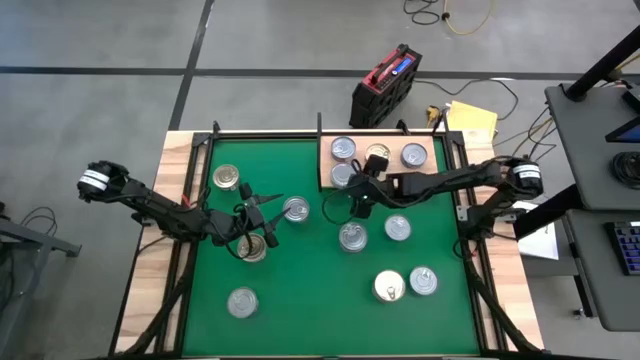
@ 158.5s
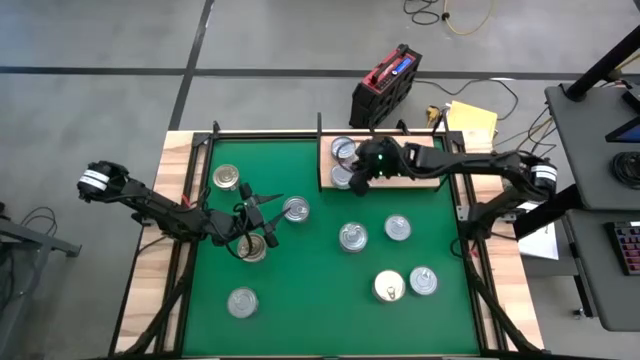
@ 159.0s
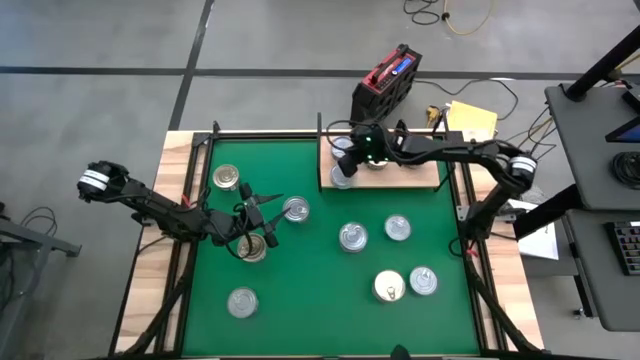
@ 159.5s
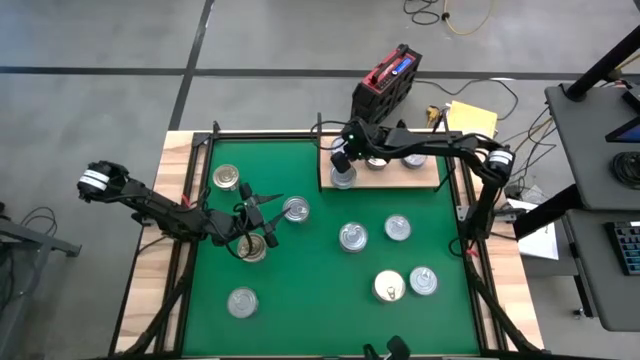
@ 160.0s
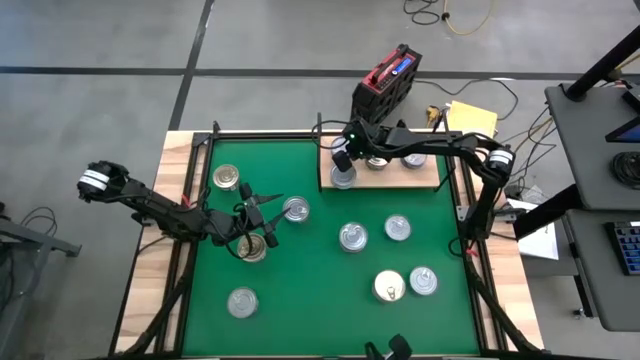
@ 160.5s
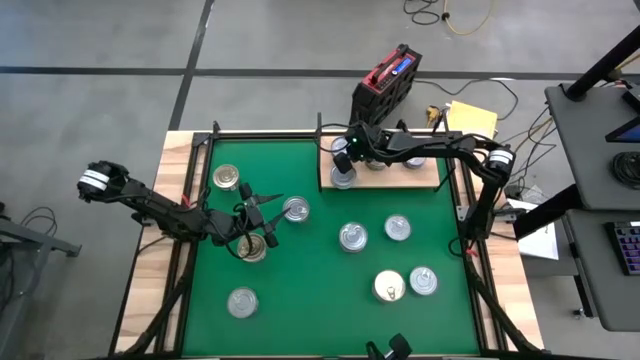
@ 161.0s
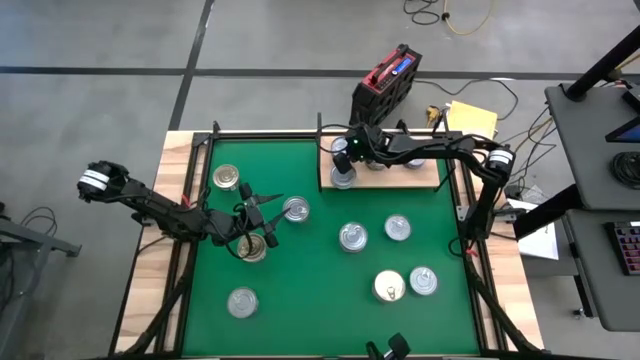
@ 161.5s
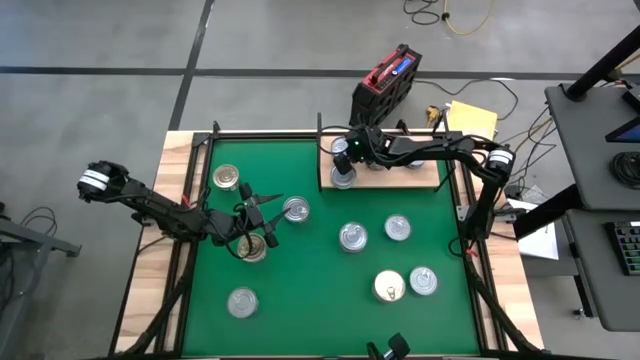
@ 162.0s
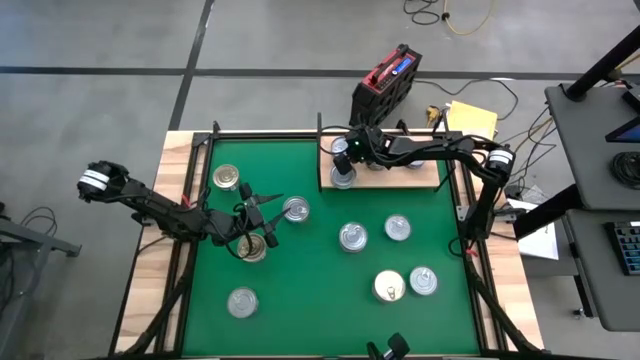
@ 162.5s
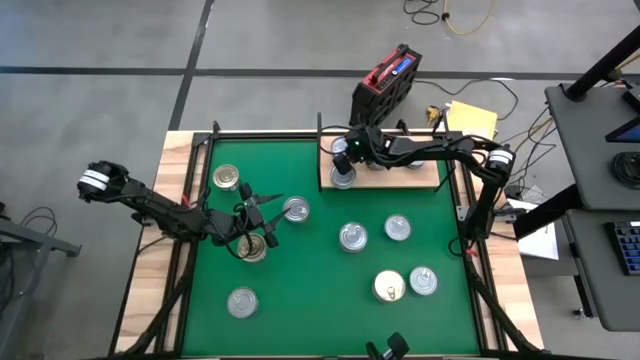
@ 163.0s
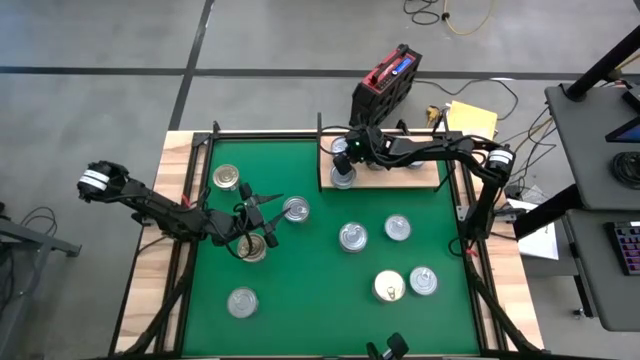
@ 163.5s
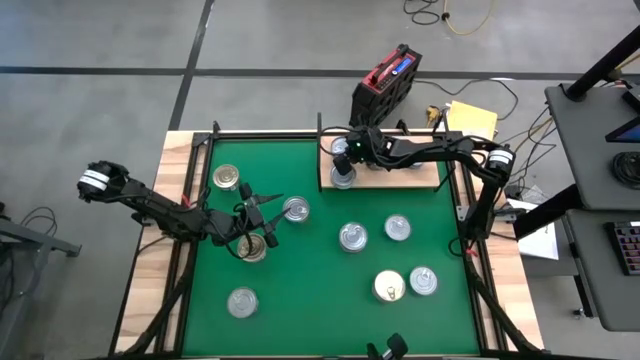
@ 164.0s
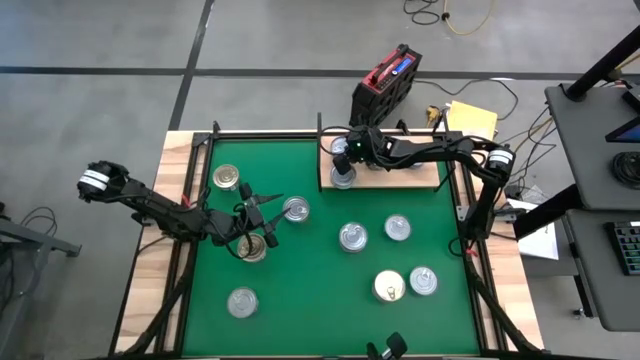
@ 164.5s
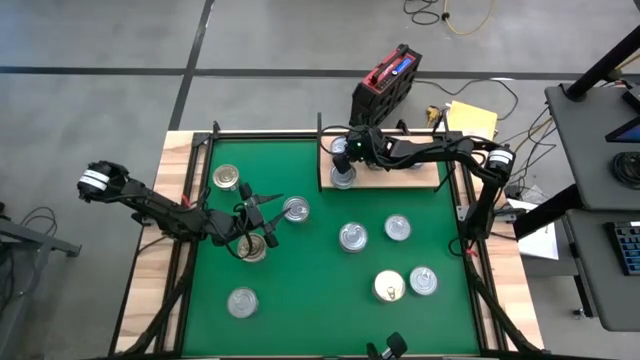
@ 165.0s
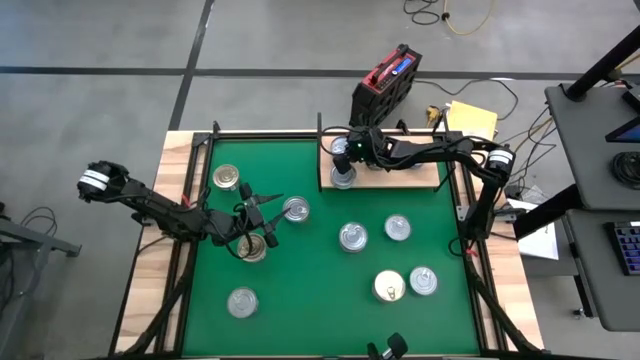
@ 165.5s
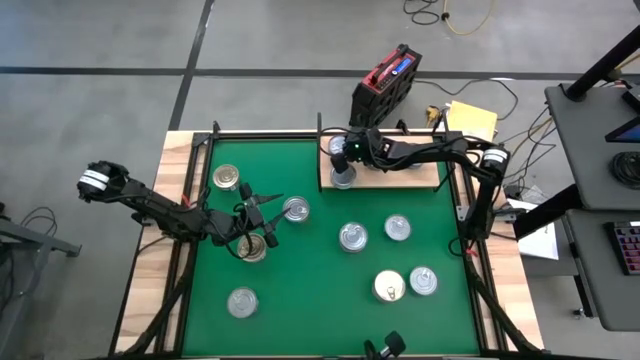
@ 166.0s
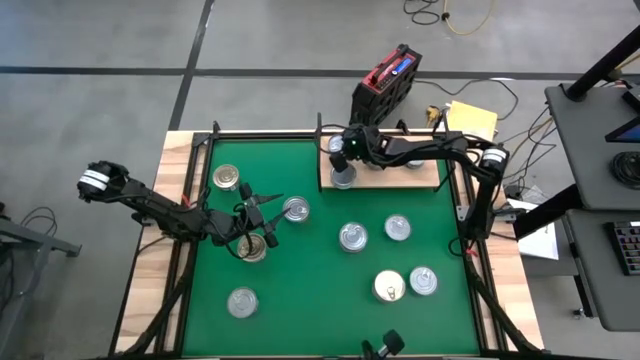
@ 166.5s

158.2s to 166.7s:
Task: Stack canned seafood by type on shelf
Adjust the red tuna can on the shelf

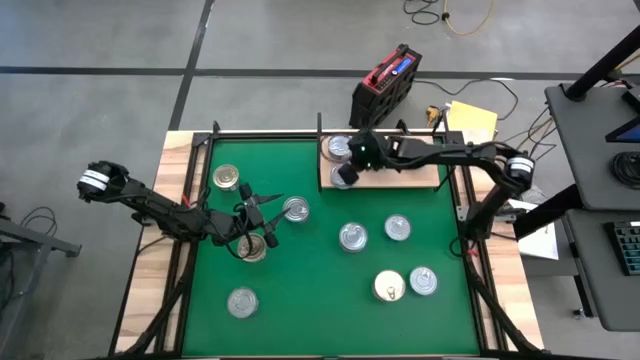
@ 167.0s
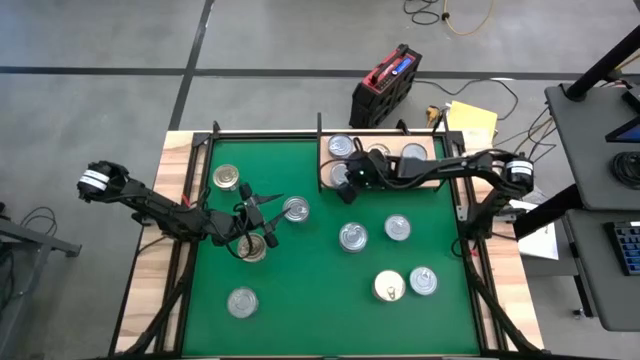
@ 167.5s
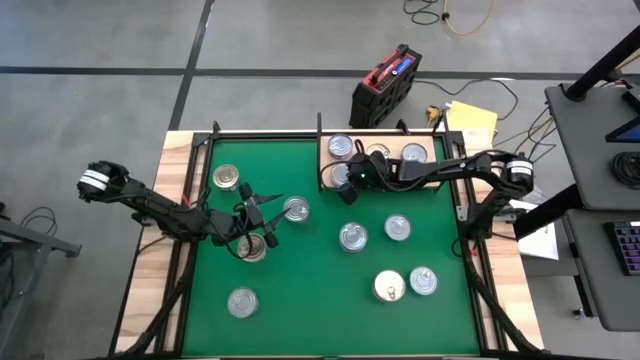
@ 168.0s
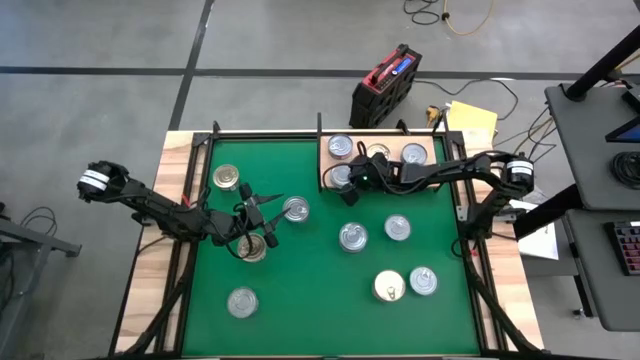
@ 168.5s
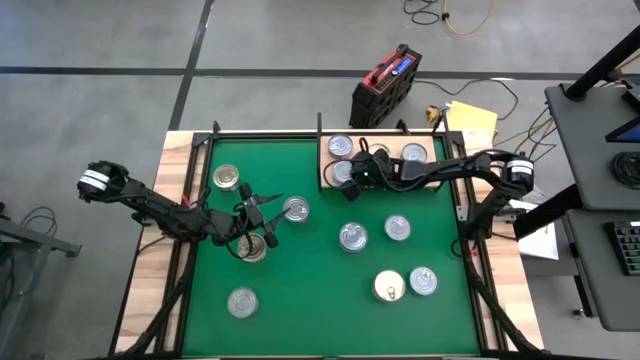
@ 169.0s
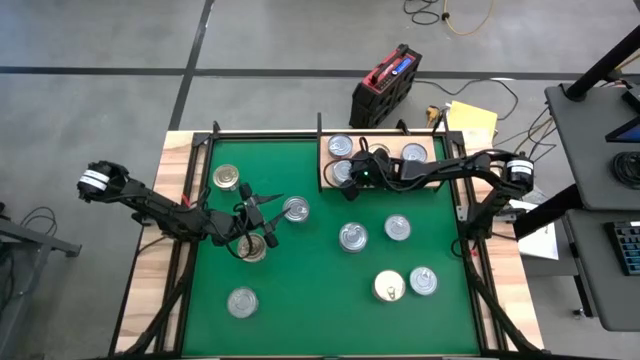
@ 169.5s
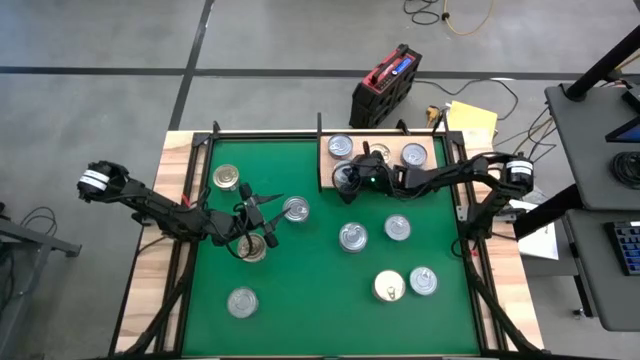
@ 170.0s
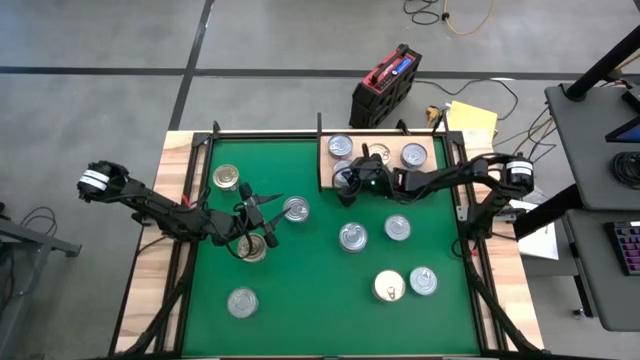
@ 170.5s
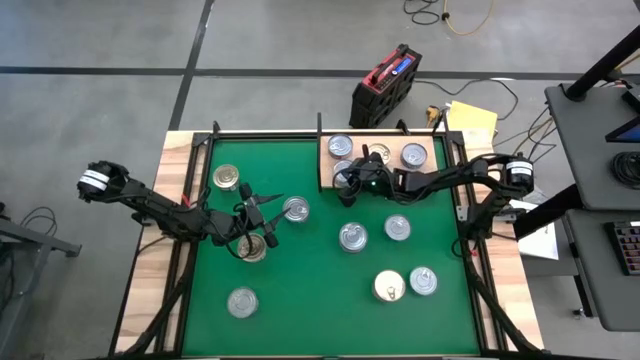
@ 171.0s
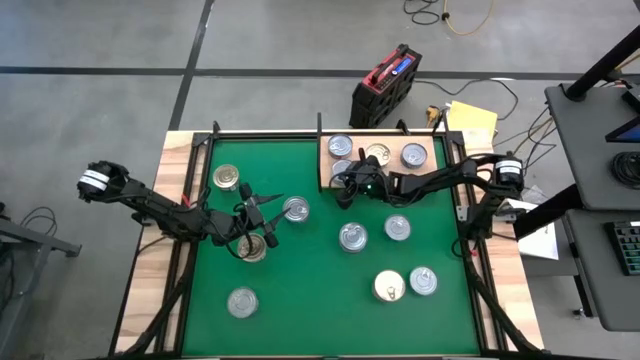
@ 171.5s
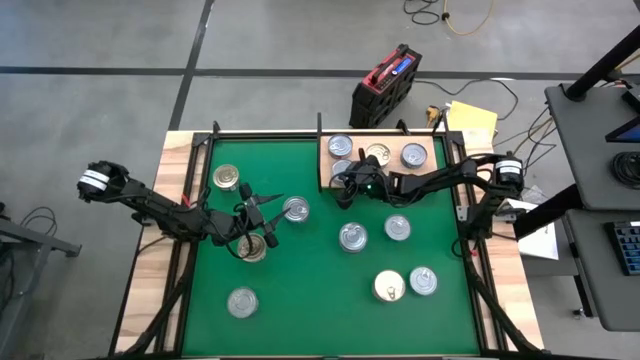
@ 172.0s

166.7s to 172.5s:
Adjust the green tuna can on the shelf

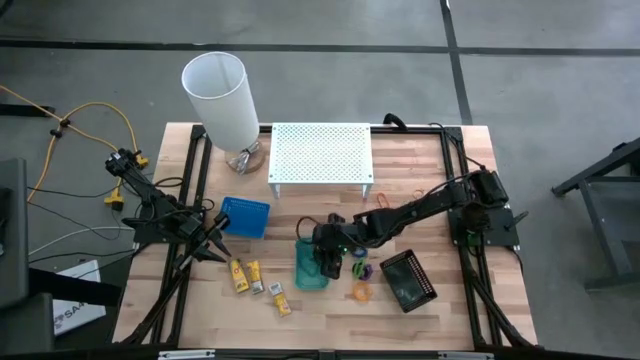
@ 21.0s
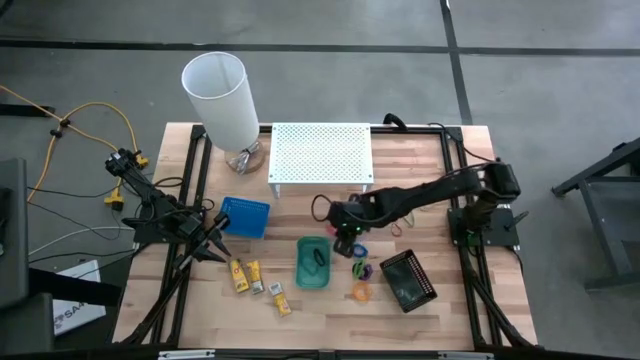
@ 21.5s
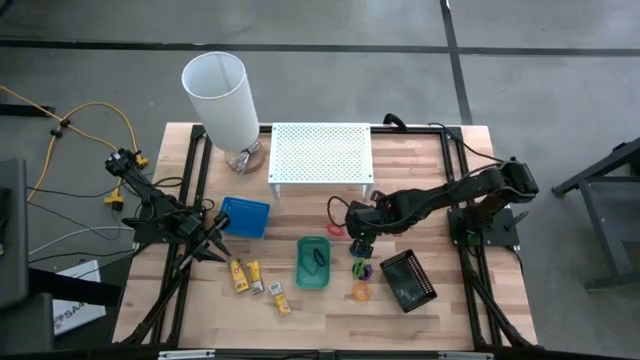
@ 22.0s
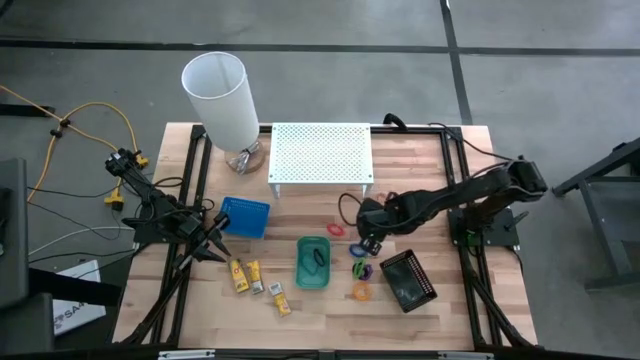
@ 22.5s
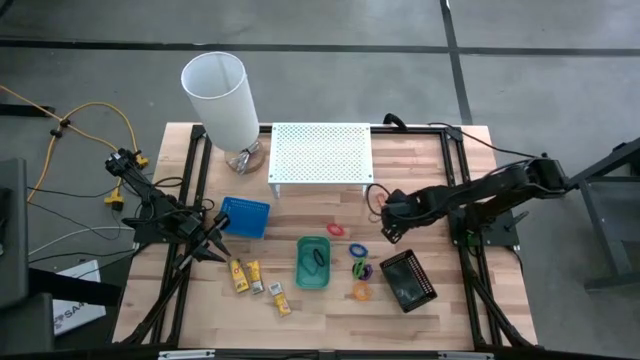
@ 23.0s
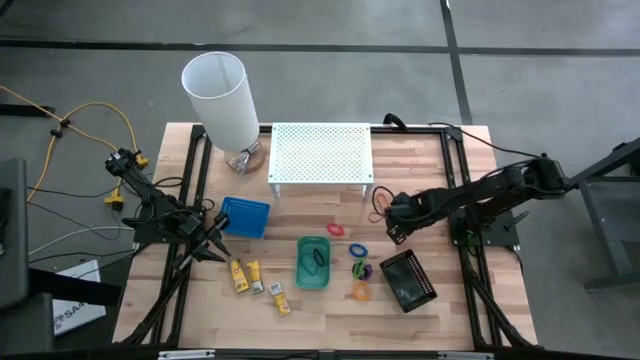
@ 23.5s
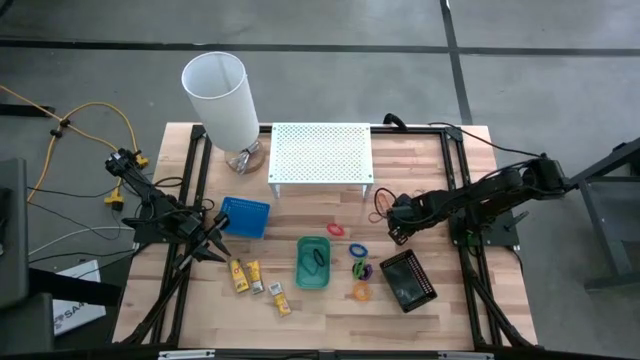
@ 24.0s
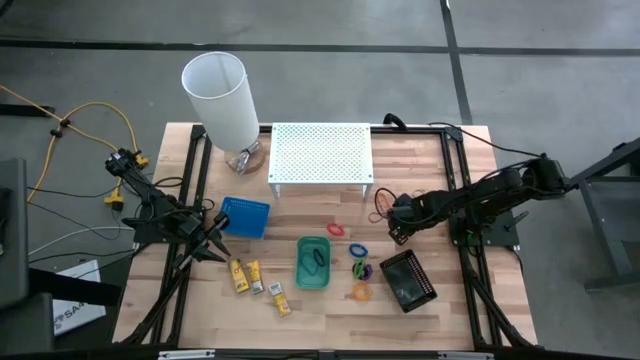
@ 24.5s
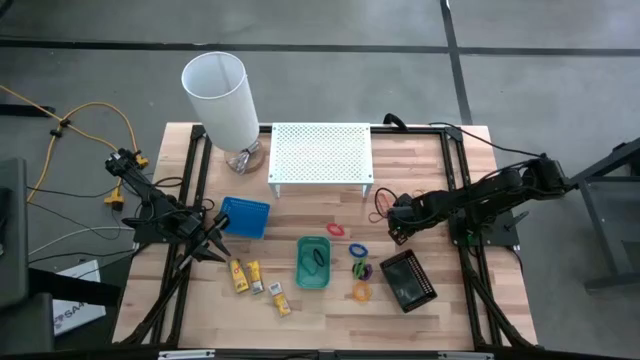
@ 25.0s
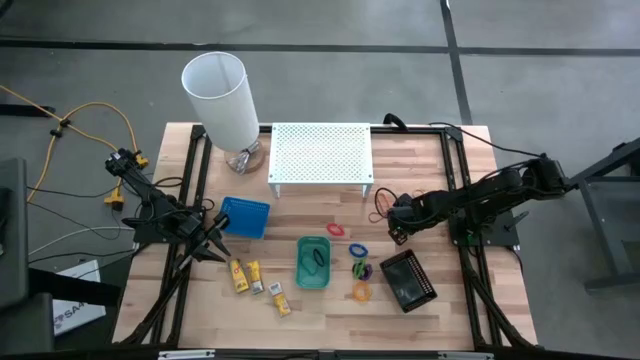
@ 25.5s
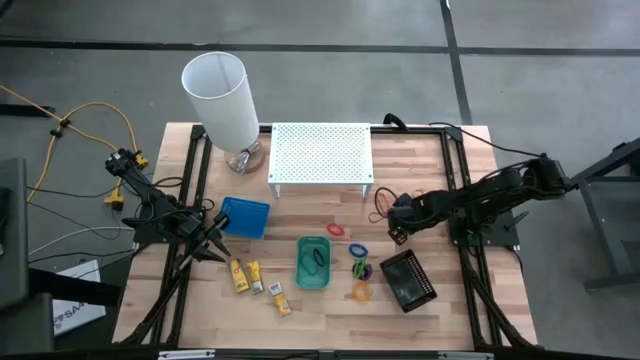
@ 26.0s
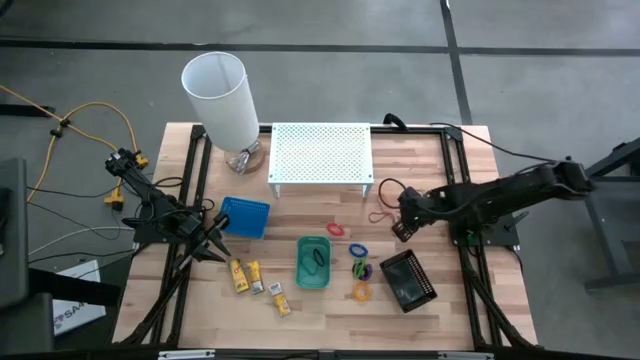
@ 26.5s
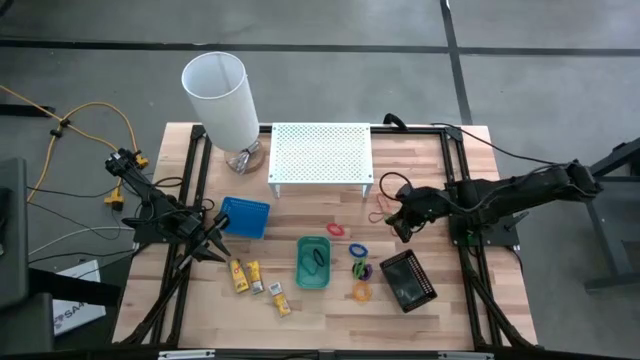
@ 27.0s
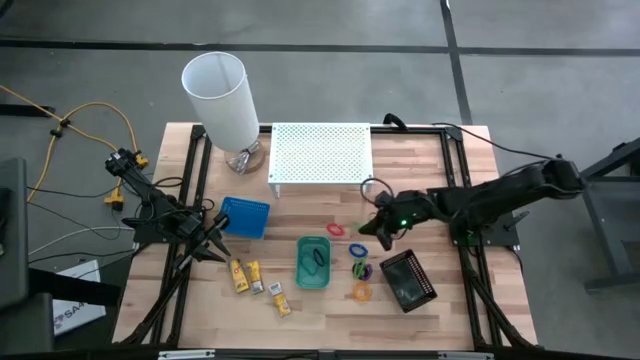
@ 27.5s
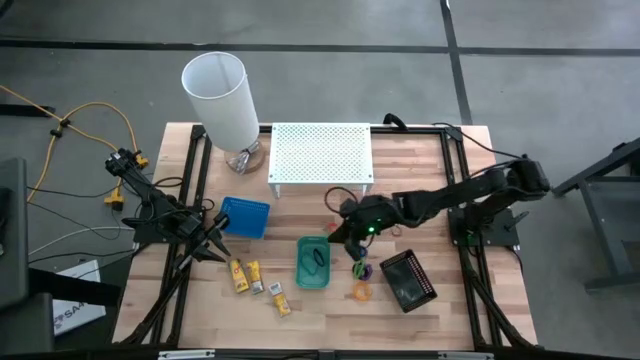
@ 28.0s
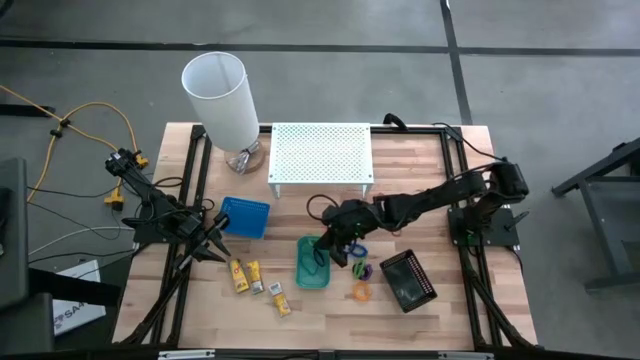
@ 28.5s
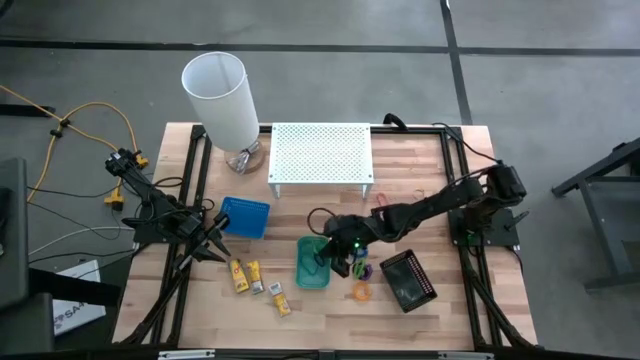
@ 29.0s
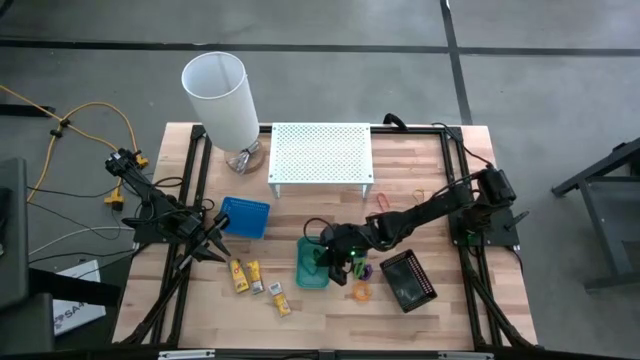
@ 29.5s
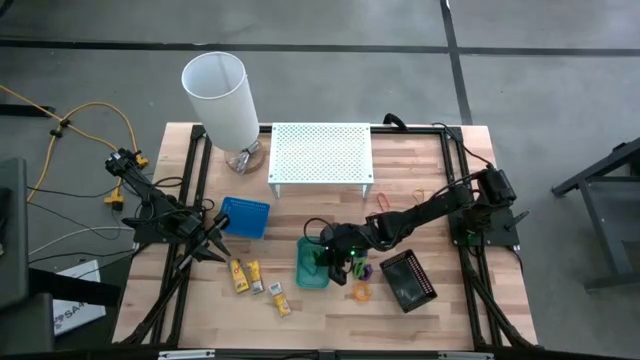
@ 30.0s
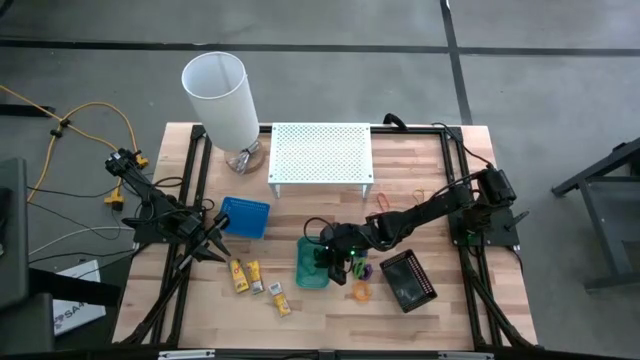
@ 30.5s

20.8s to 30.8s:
Task: Pick & Place Office Desk Supplies
Put the green rubber band into the green bin
